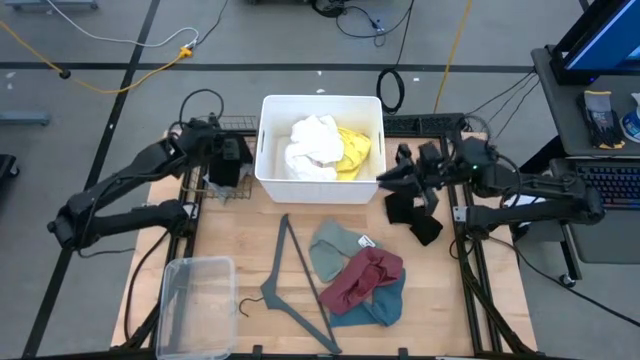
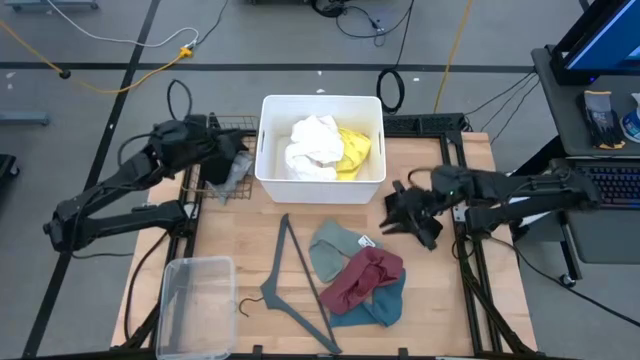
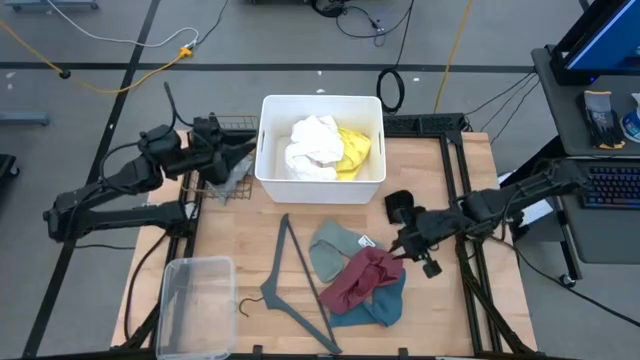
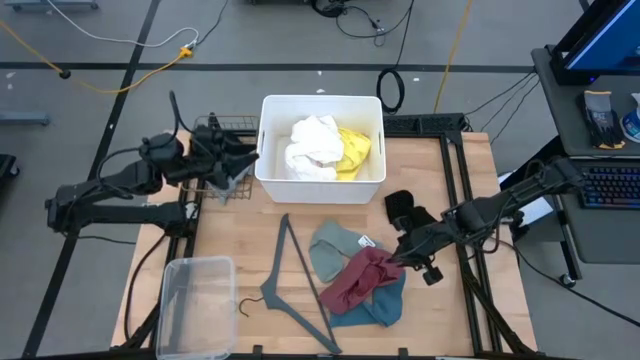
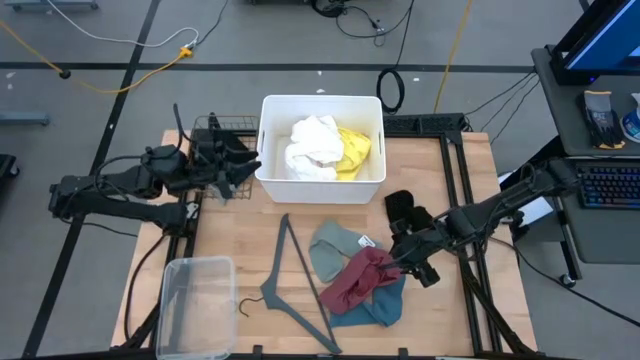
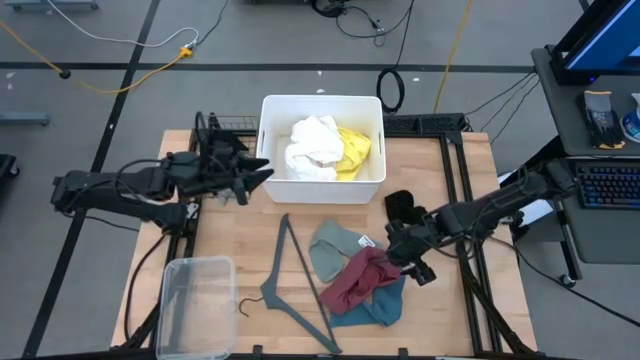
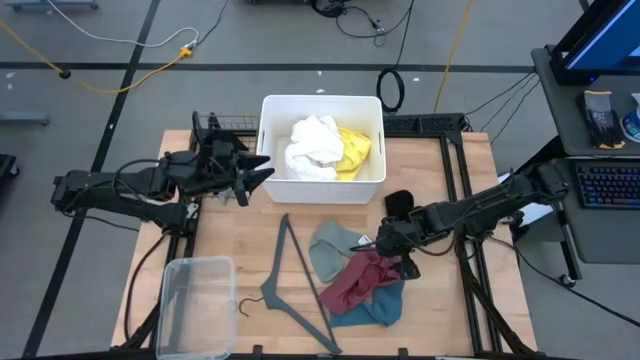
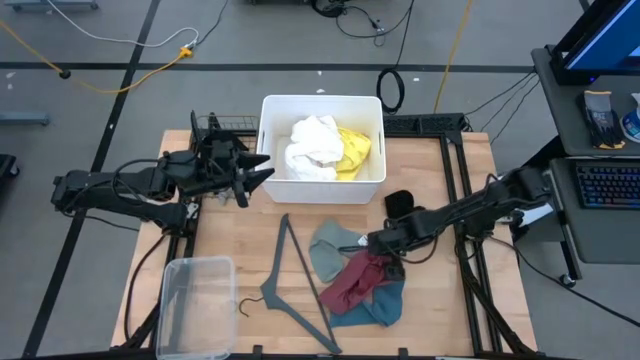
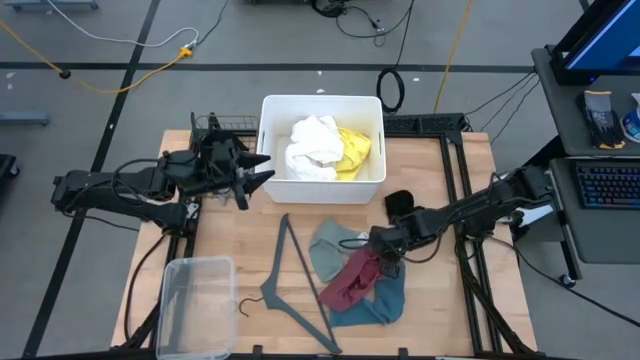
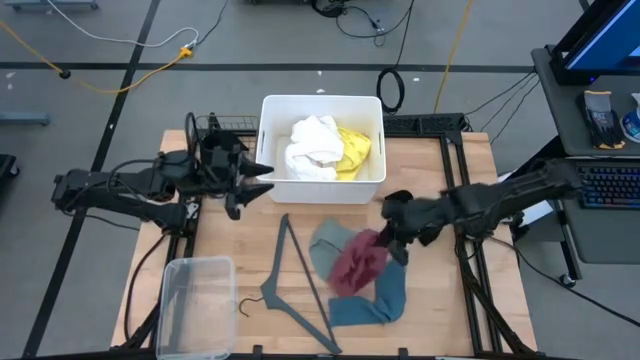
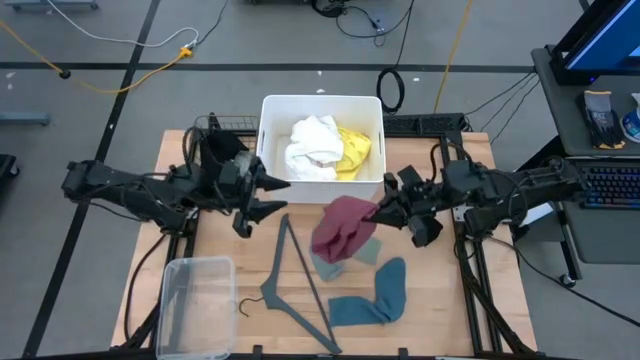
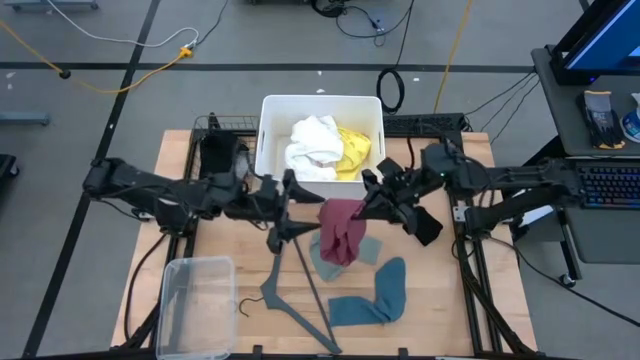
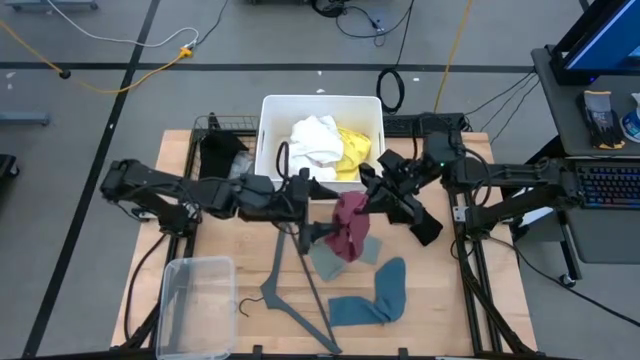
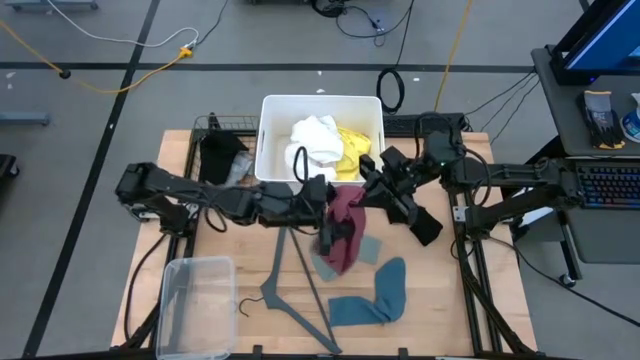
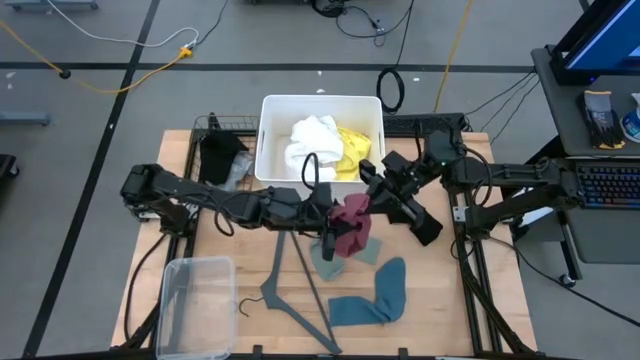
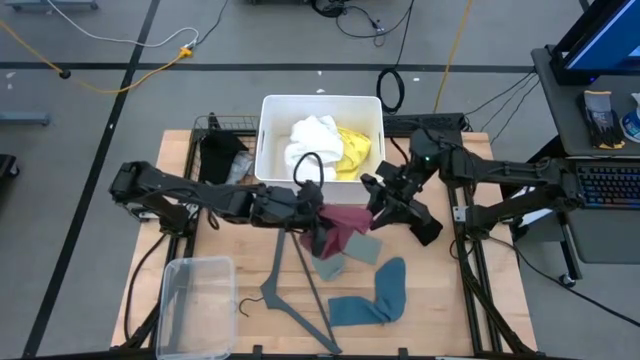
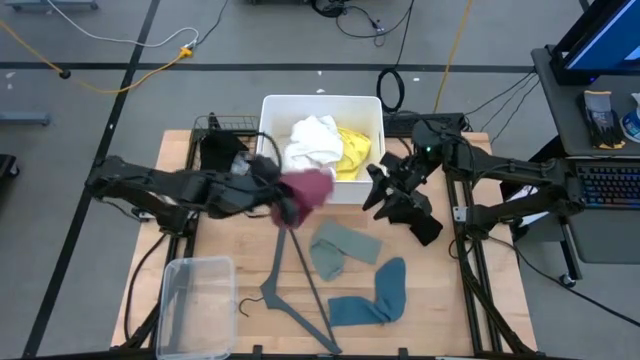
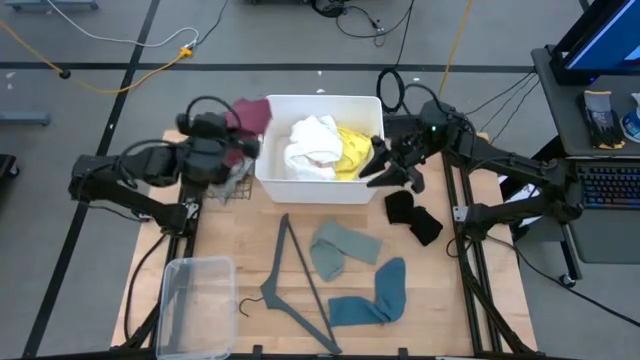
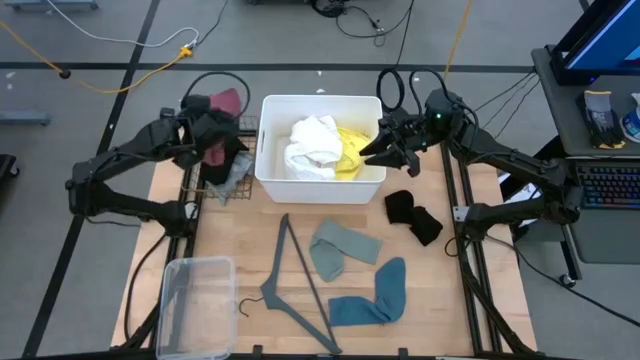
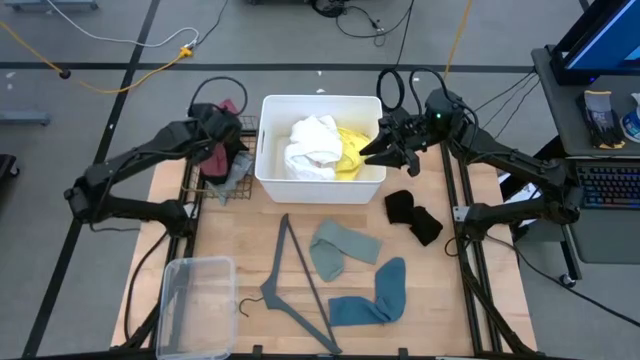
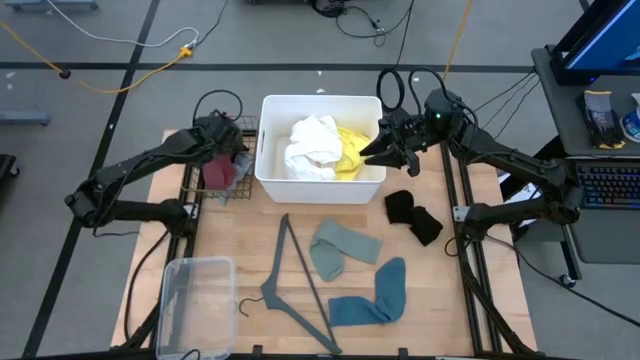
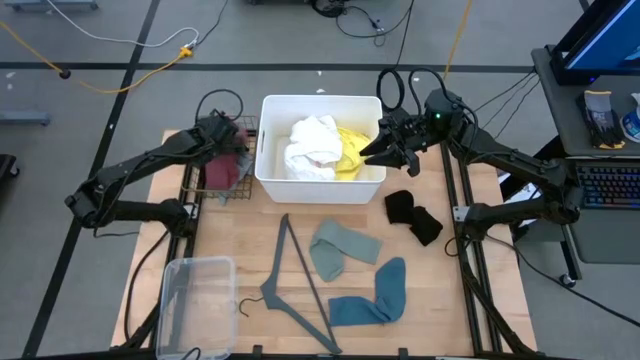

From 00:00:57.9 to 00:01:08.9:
Task: Pick & Place Cloths
Put the maroon underwear into the gold wire basket

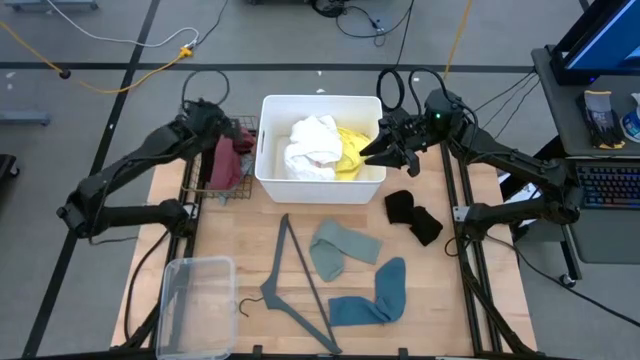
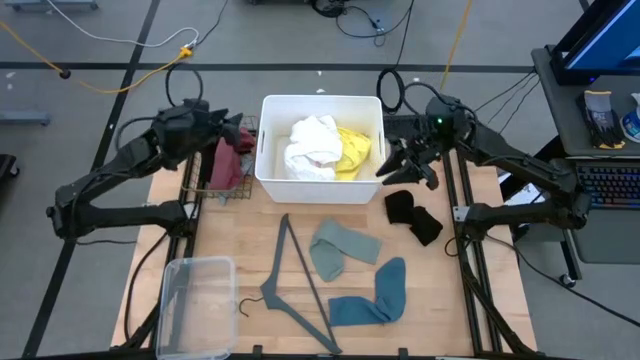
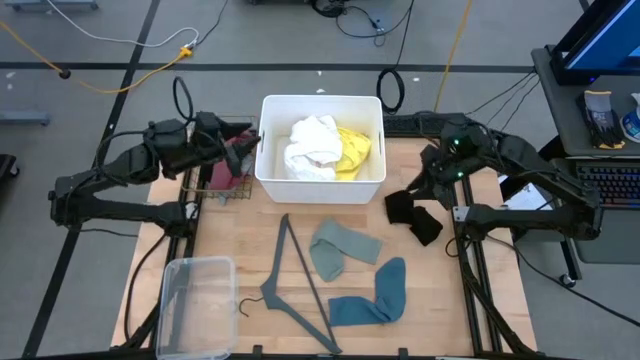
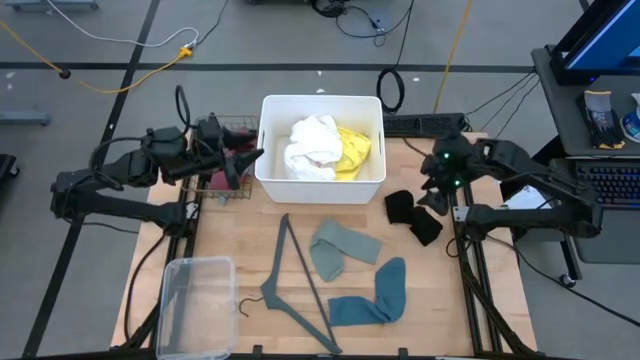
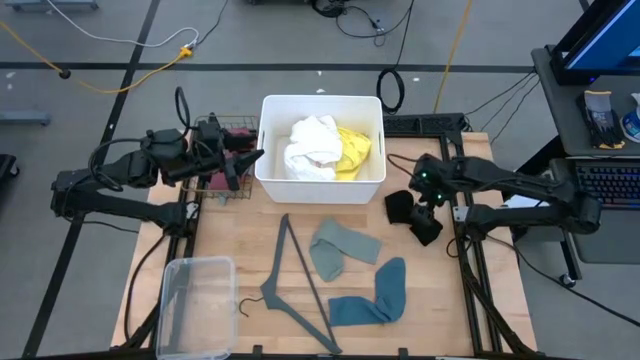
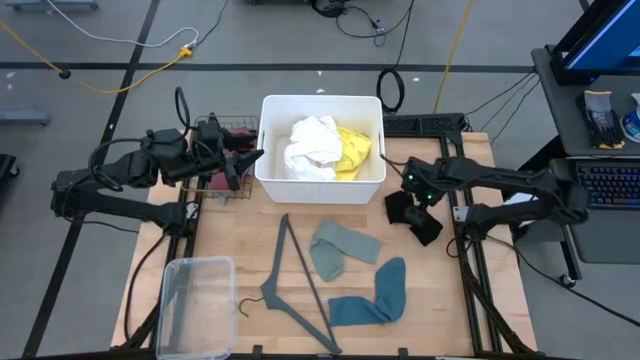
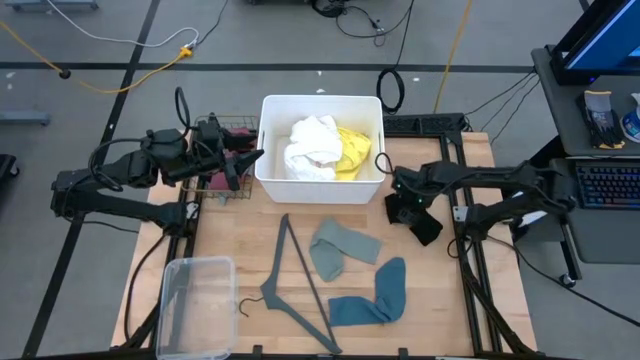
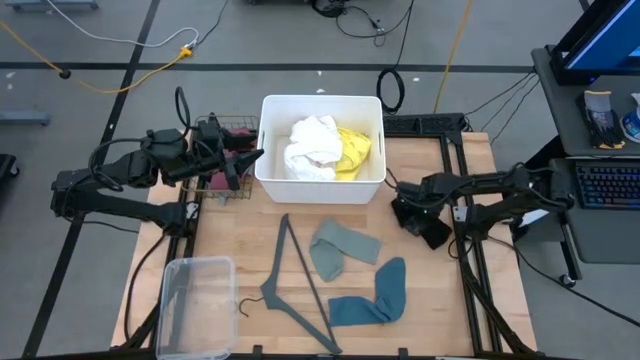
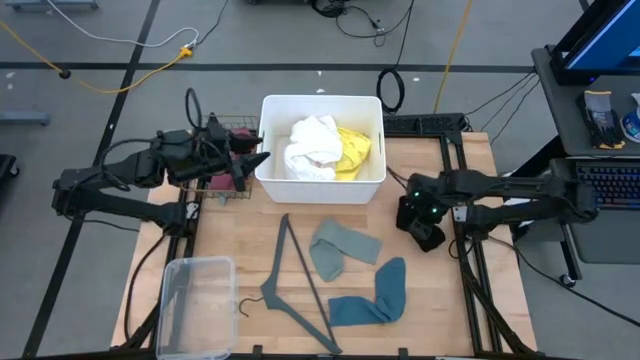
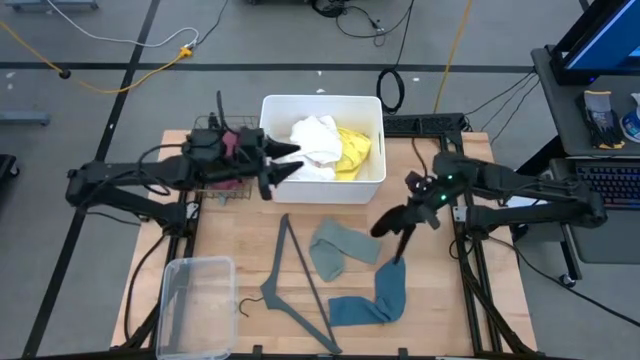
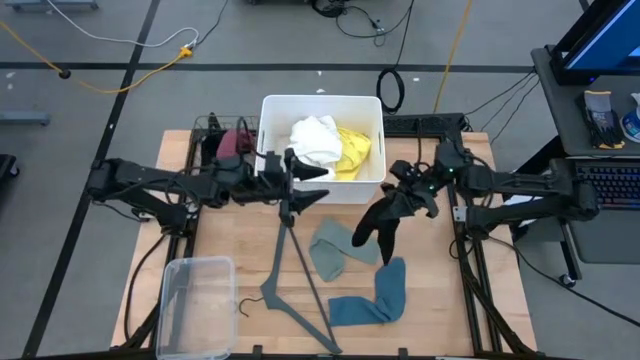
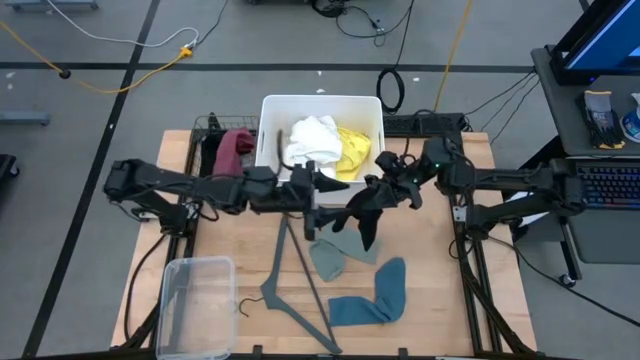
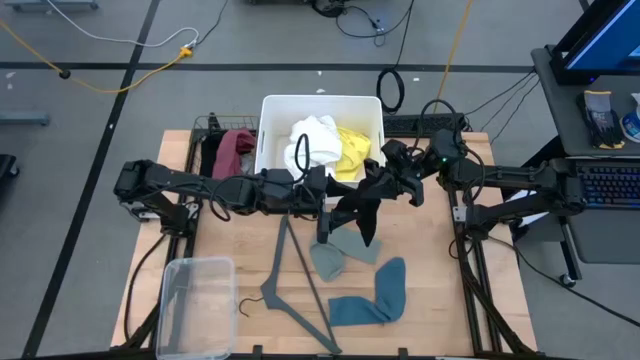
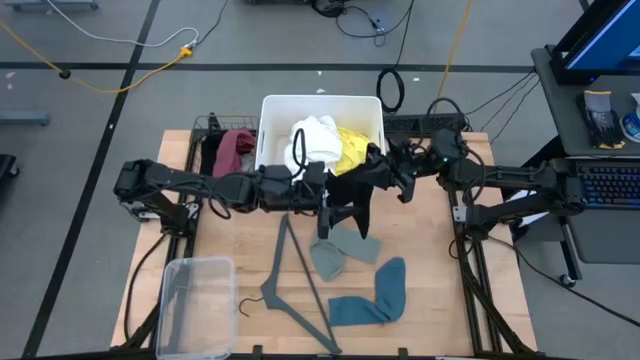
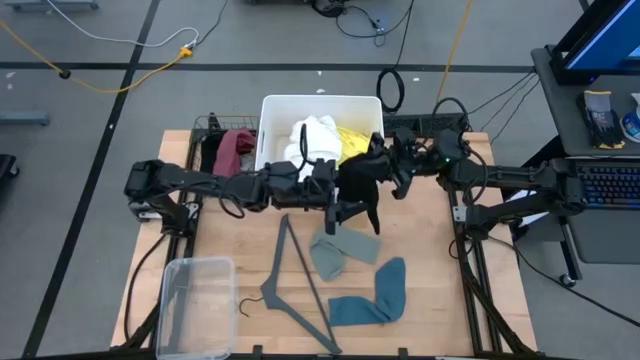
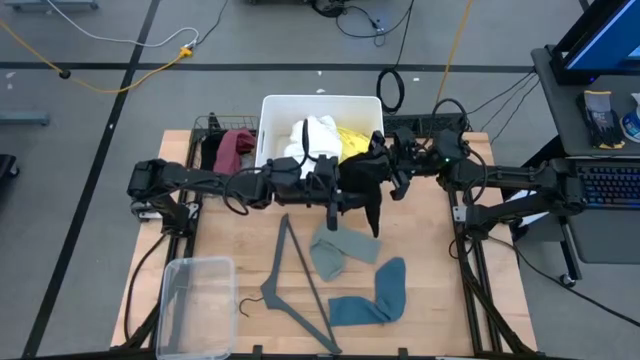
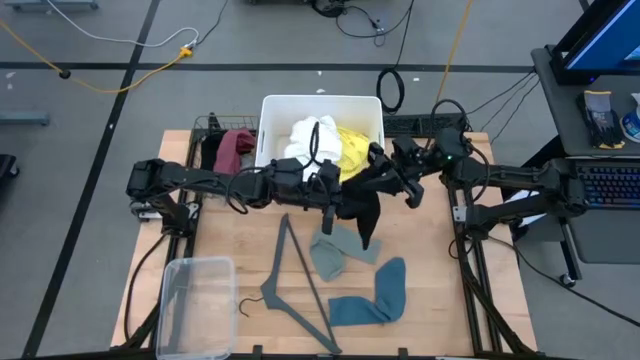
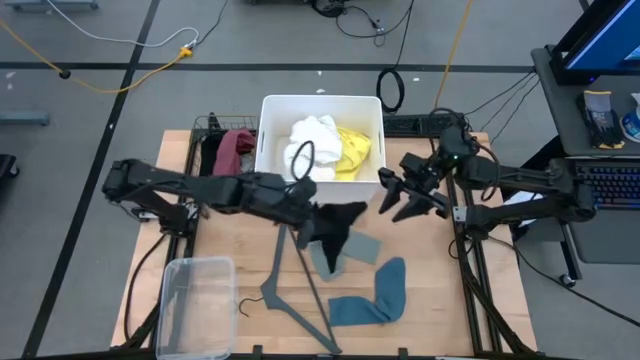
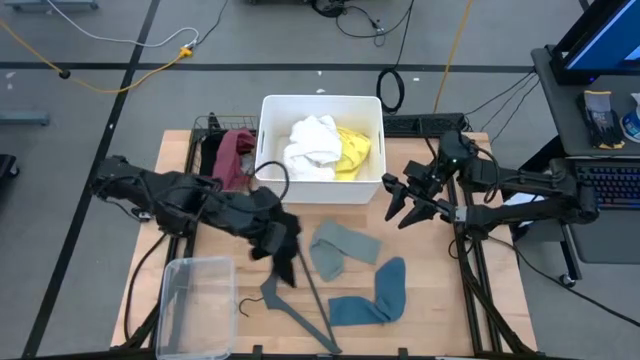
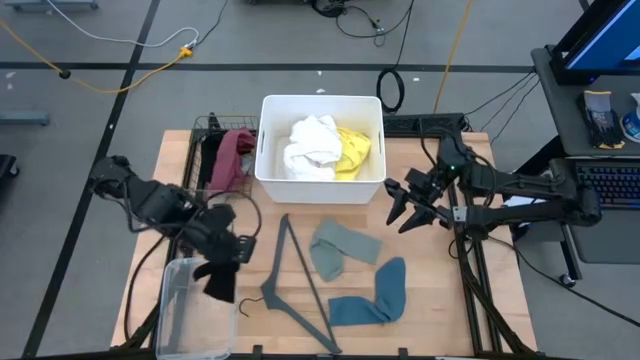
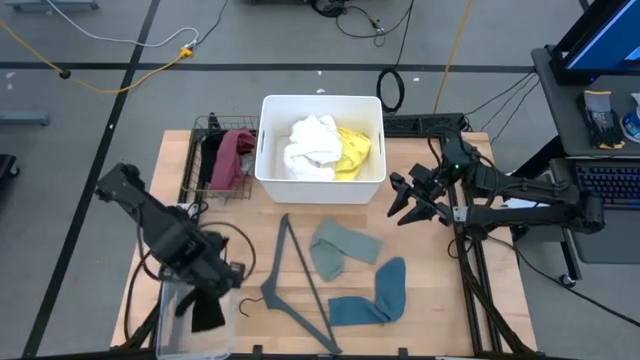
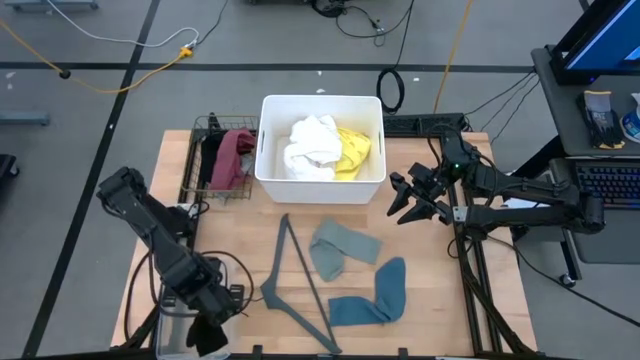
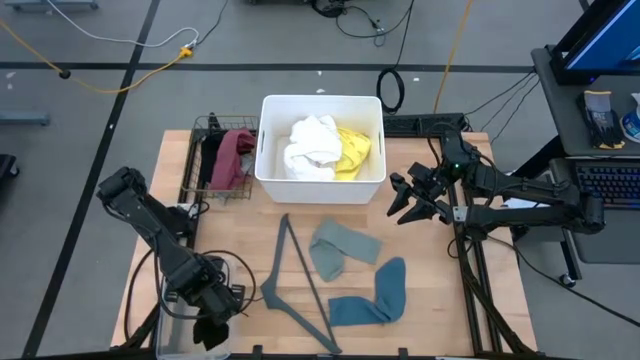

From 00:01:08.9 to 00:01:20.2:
Put the black sock into the transparent bin

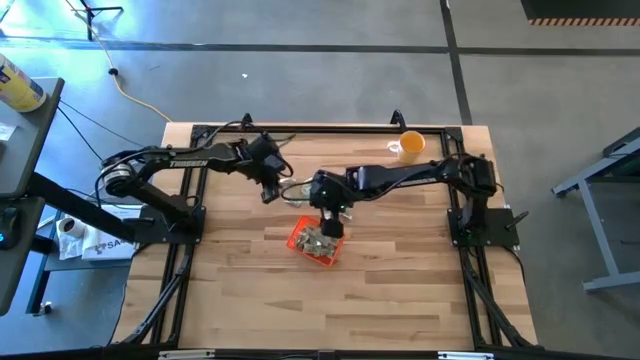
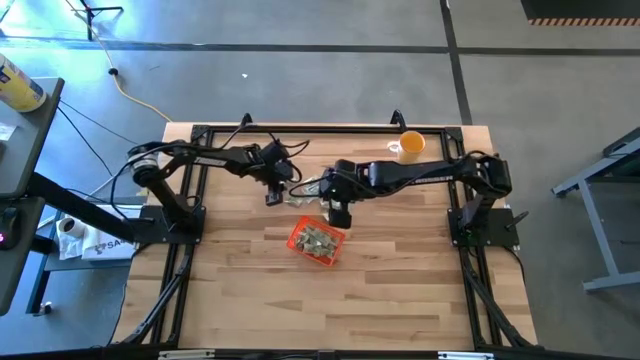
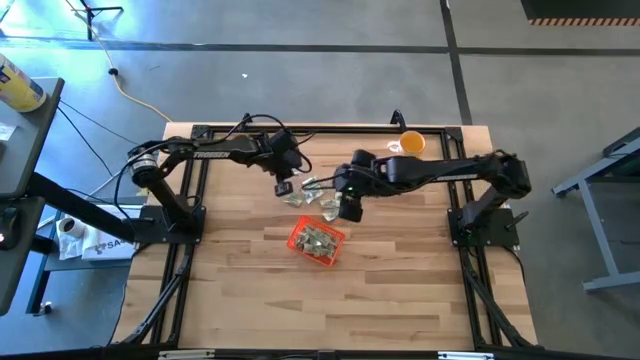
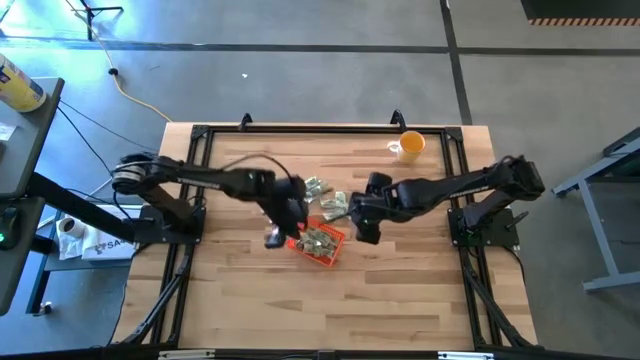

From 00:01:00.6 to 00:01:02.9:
Task: Pick and place Stevia / Truvia into bins
Put the stevia packet into the orange bin
